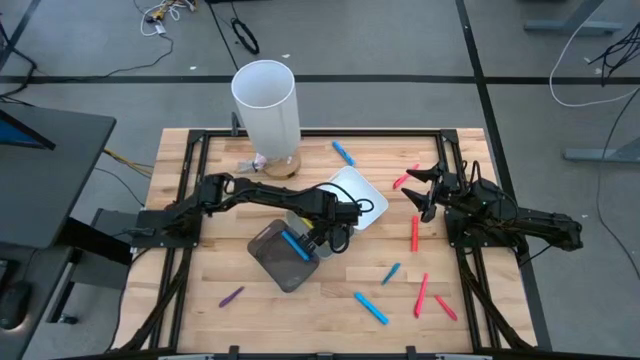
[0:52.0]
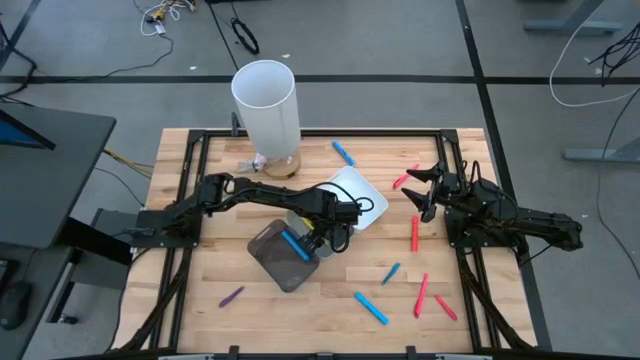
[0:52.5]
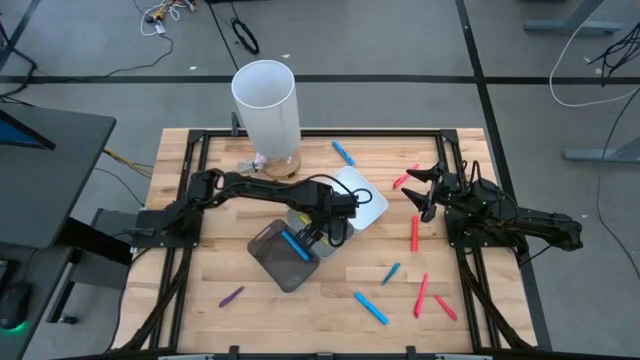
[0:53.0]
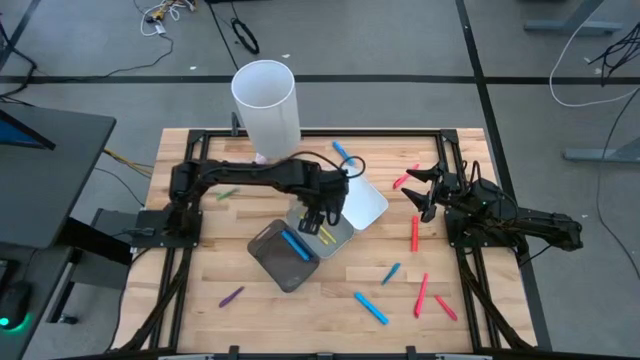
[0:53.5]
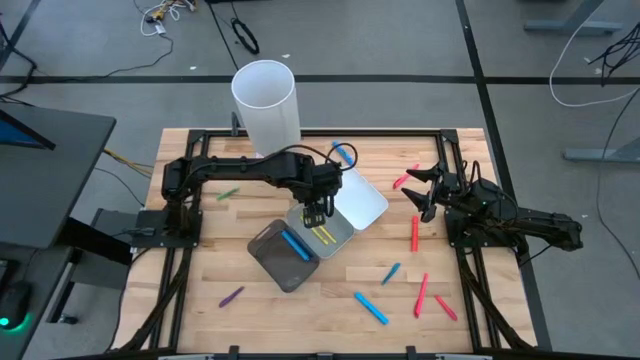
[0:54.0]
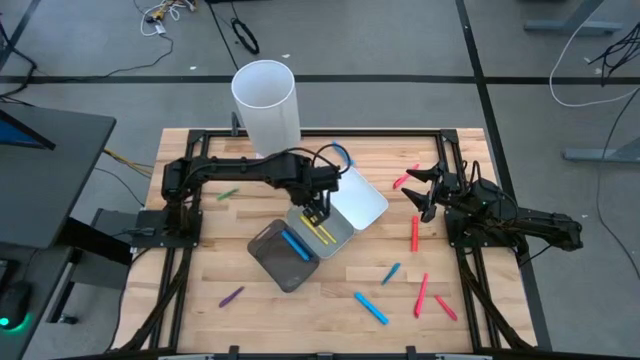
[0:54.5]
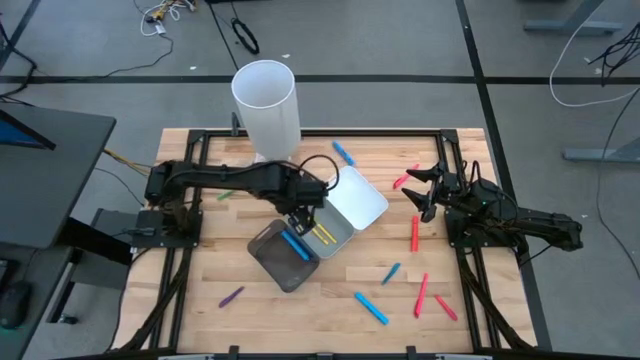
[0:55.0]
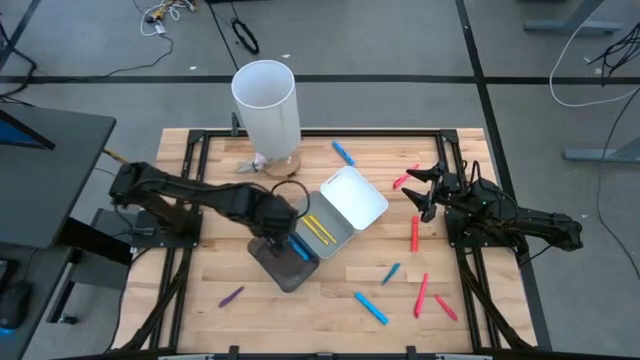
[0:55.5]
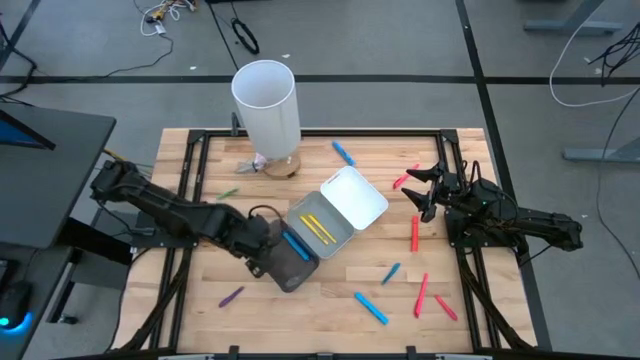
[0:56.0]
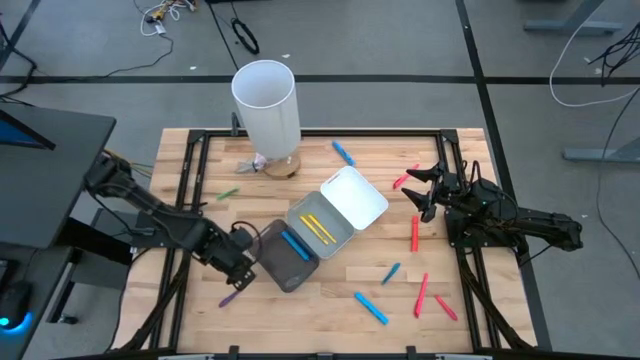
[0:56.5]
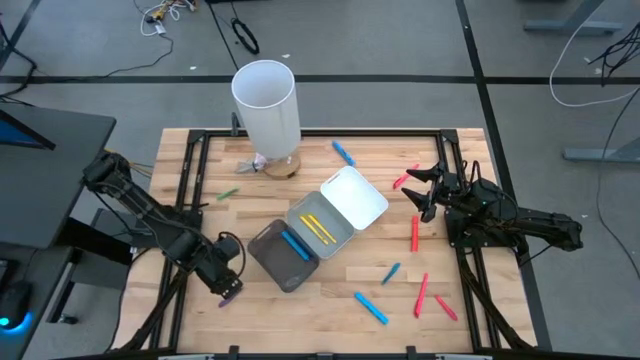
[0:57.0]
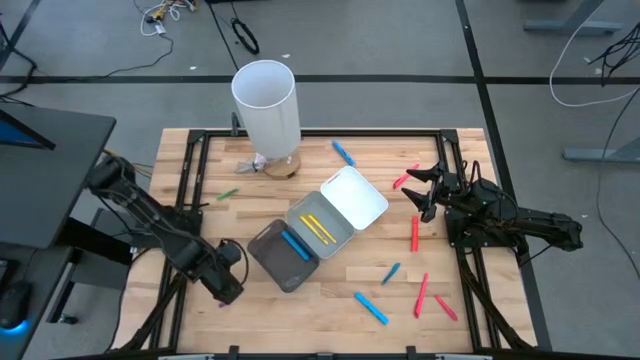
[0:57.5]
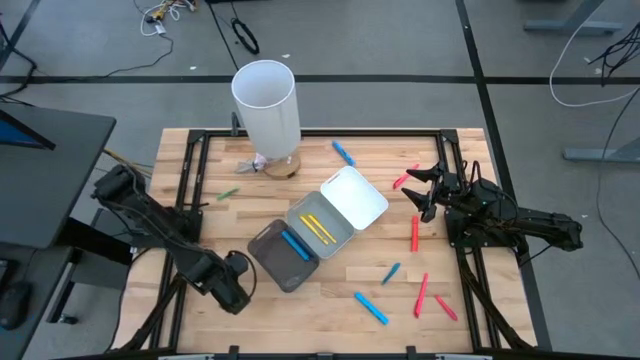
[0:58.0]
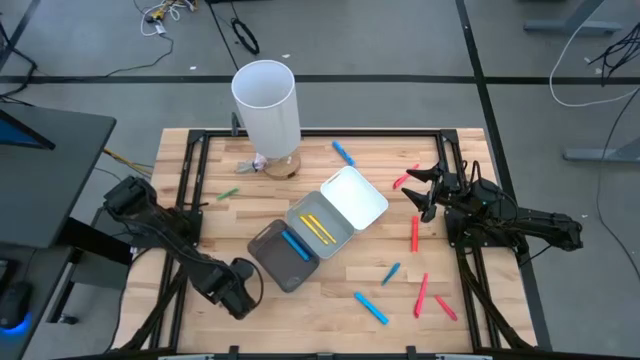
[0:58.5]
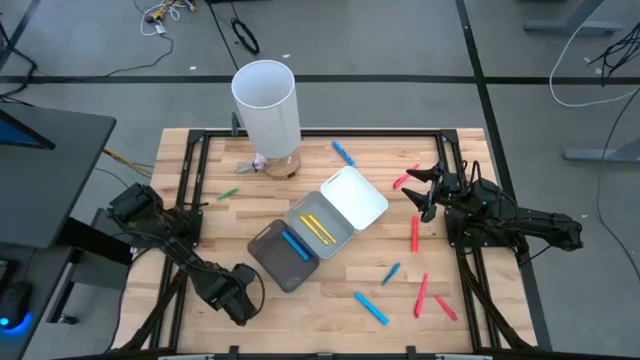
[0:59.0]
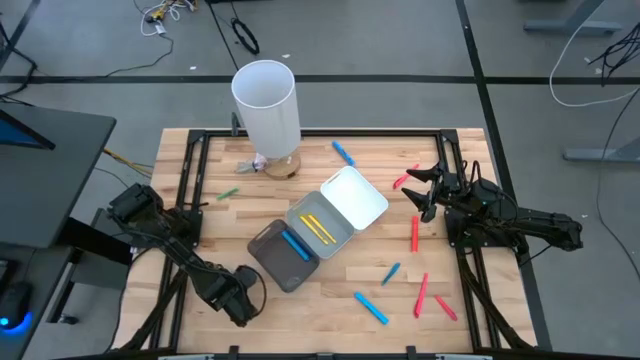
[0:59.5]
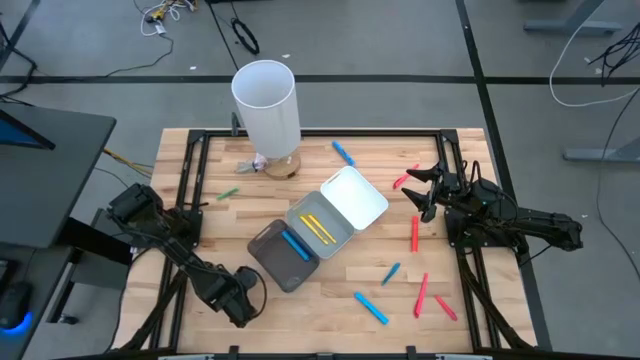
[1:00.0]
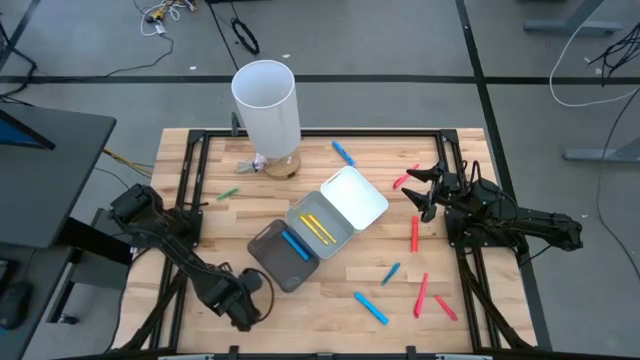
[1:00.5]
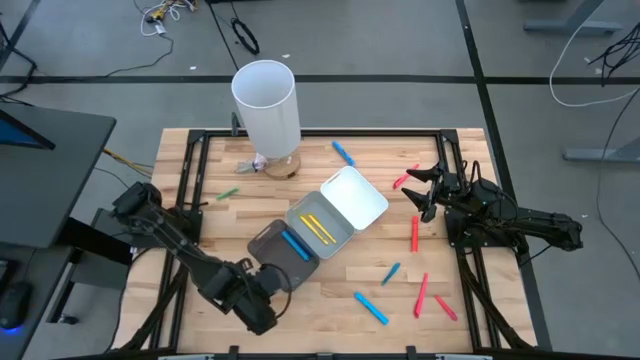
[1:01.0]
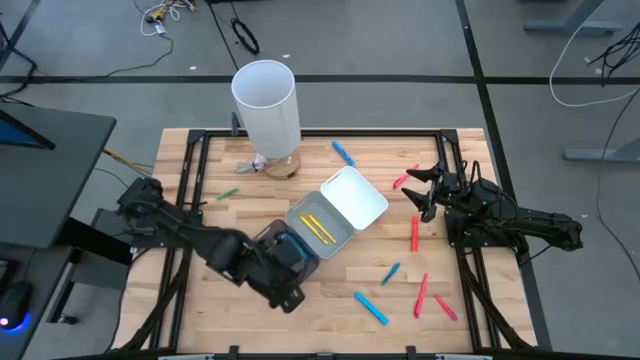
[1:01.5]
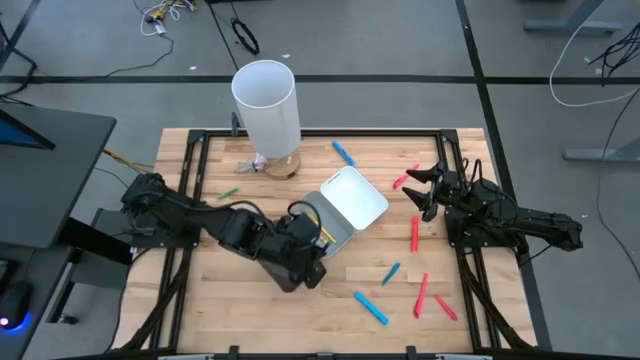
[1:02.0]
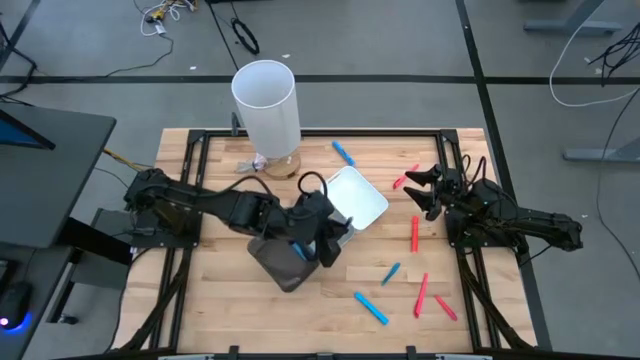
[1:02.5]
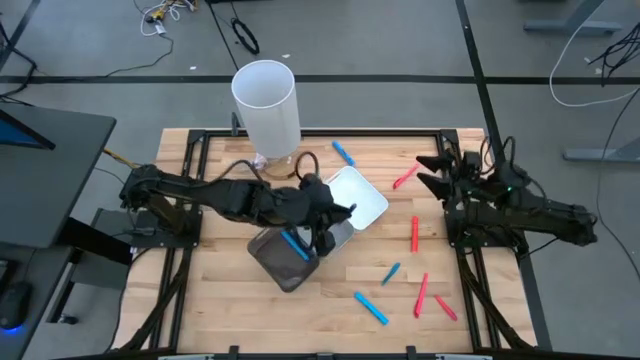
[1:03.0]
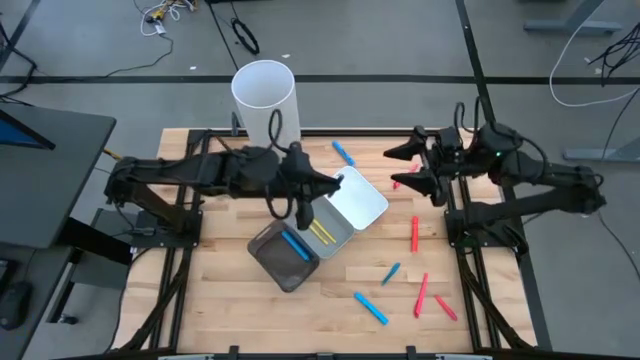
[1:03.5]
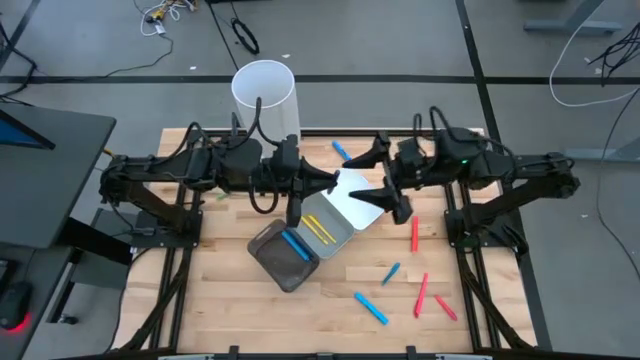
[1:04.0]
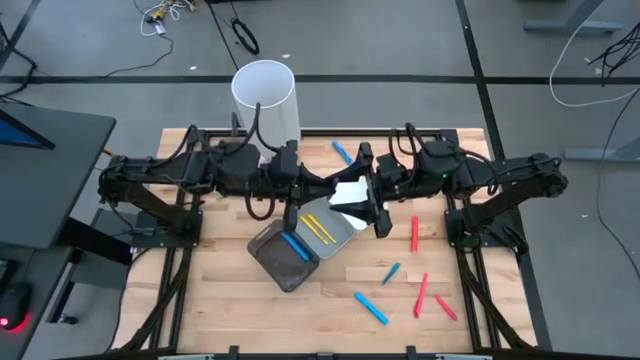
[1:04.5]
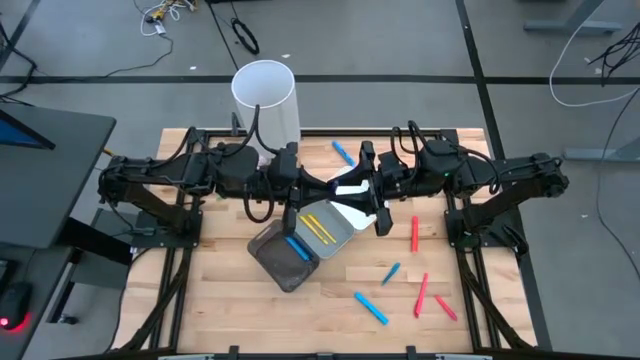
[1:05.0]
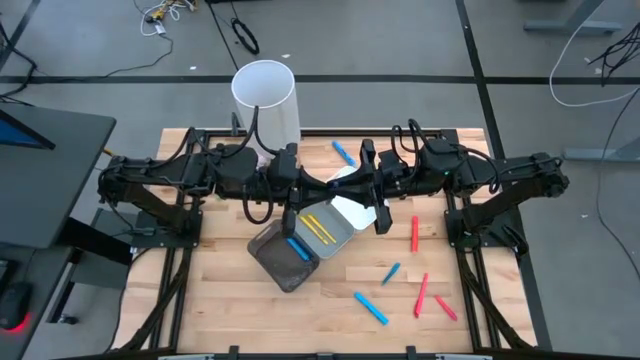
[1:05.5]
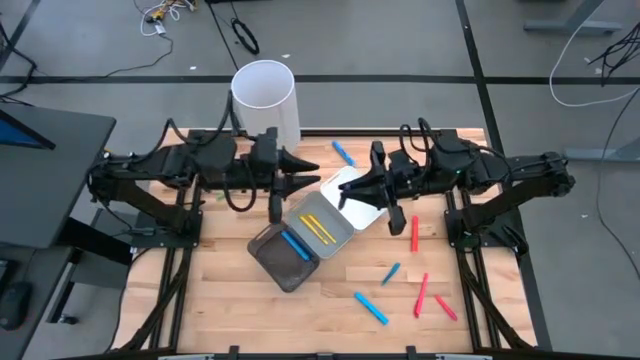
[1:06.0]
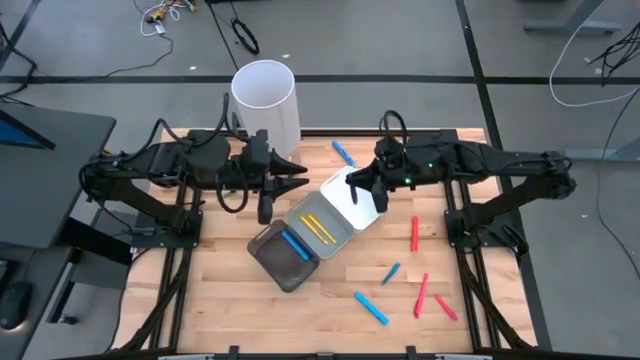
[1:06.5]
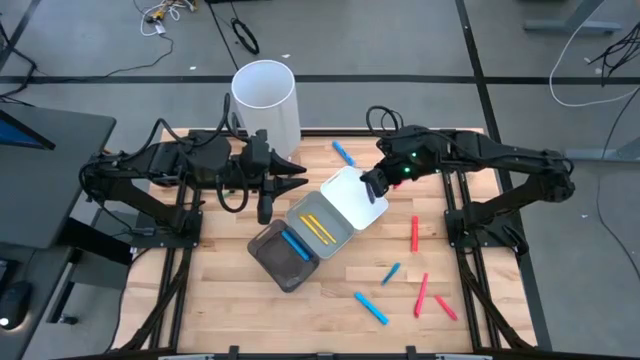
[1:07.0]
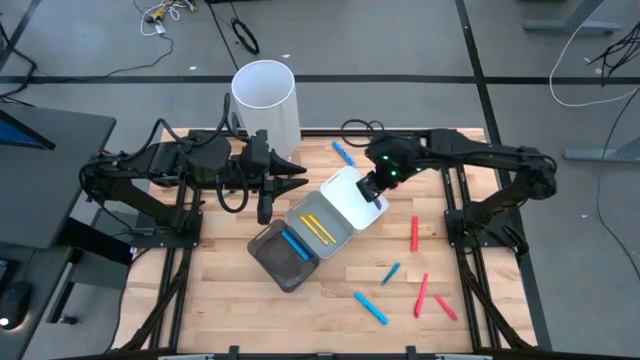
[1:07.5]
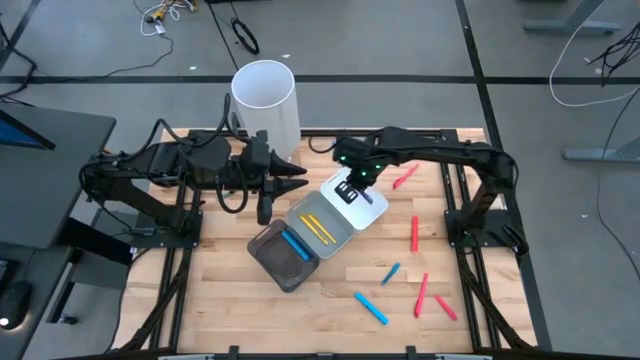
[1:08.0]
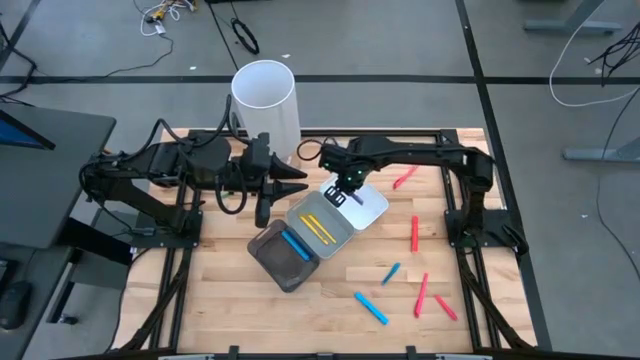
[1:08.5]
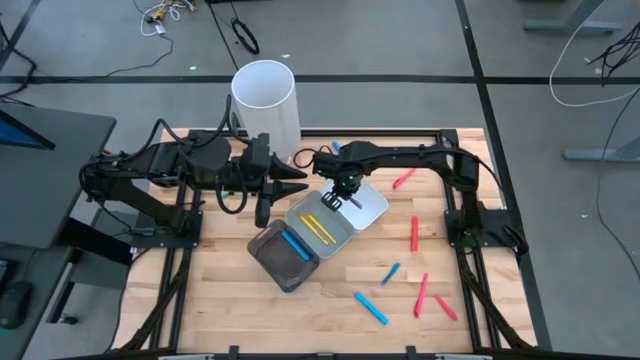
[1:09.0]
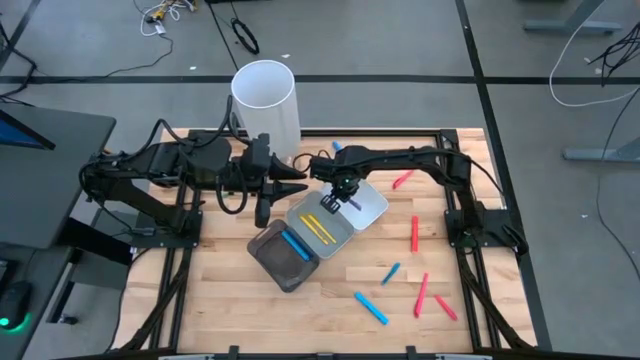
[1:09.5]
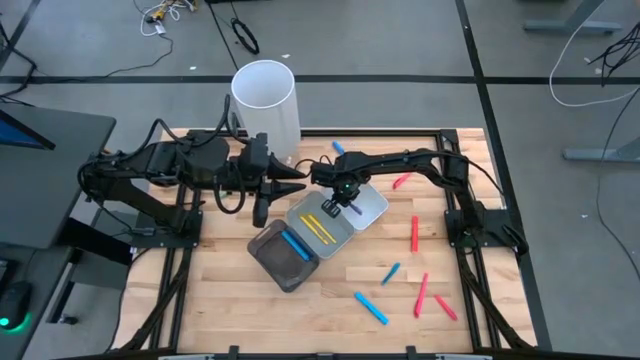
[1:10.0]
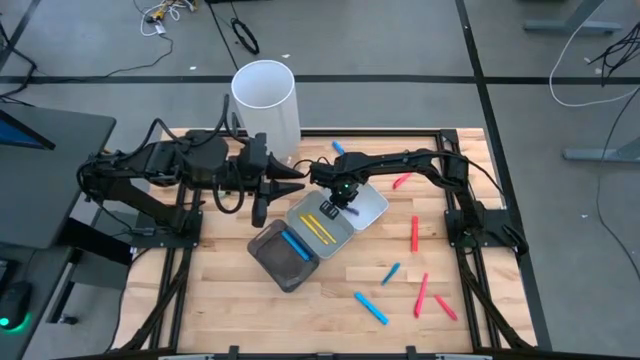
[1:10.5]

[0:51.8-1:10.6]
Task: Pick & Place Markers
Put the purple pen into the white bin

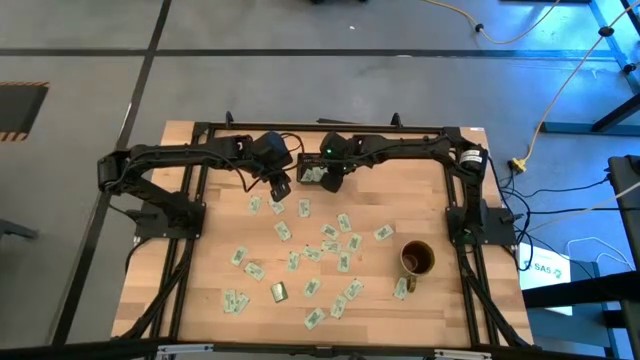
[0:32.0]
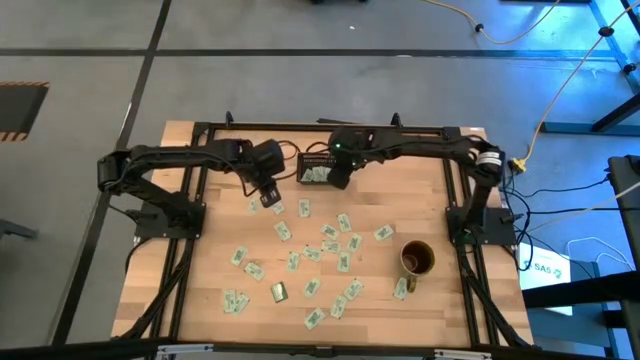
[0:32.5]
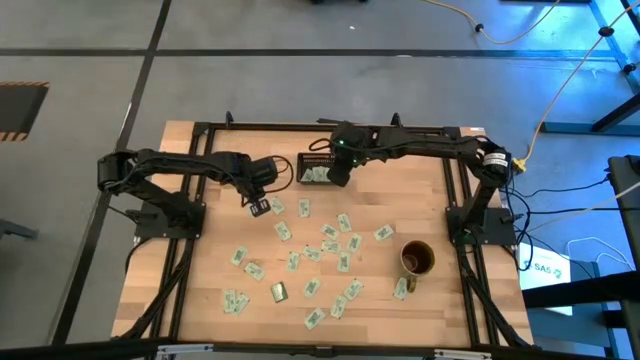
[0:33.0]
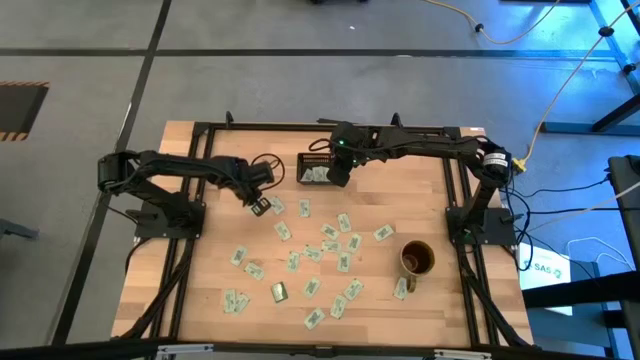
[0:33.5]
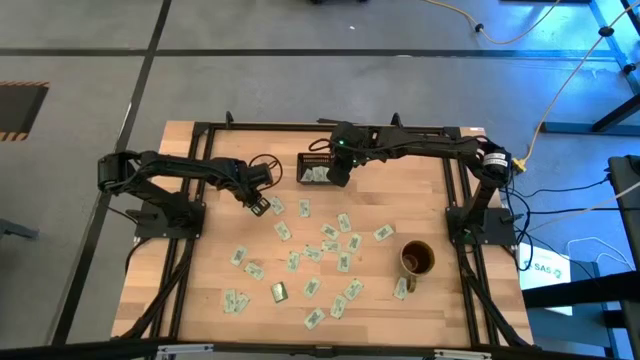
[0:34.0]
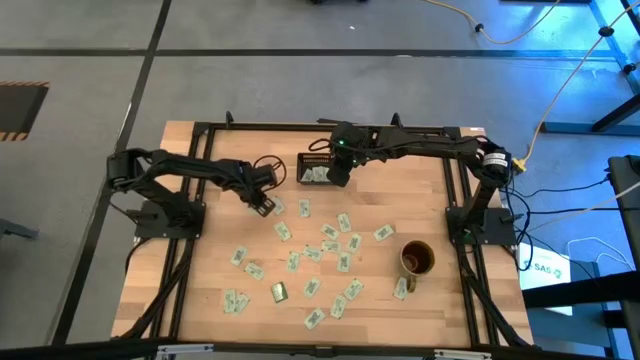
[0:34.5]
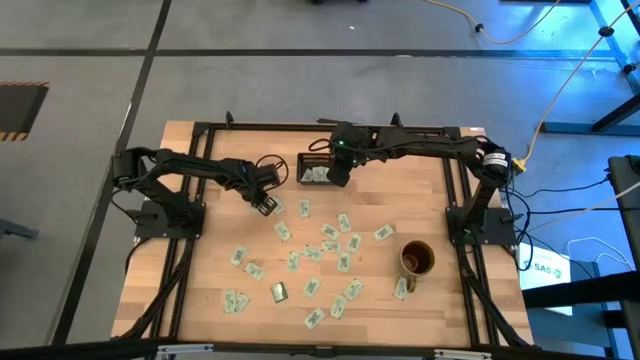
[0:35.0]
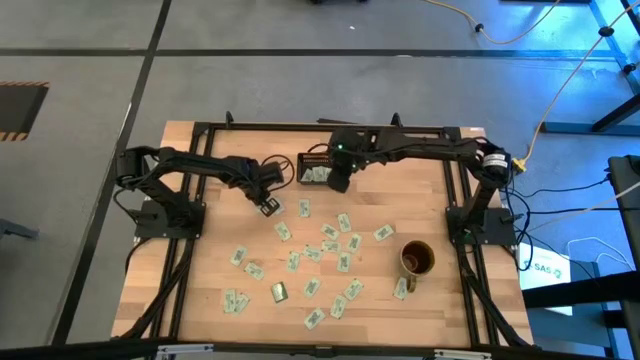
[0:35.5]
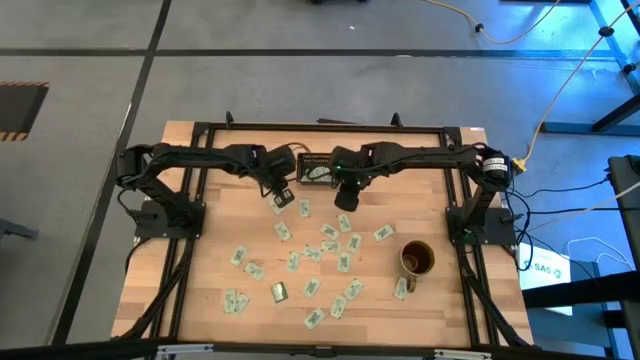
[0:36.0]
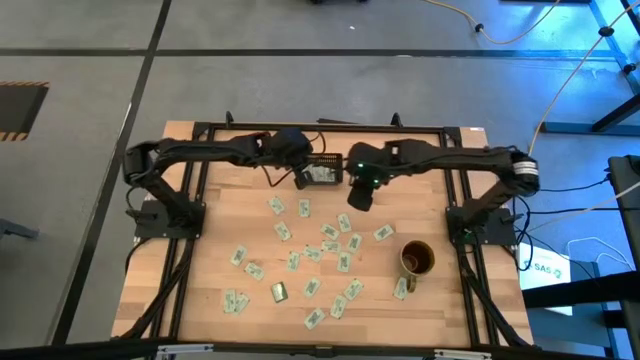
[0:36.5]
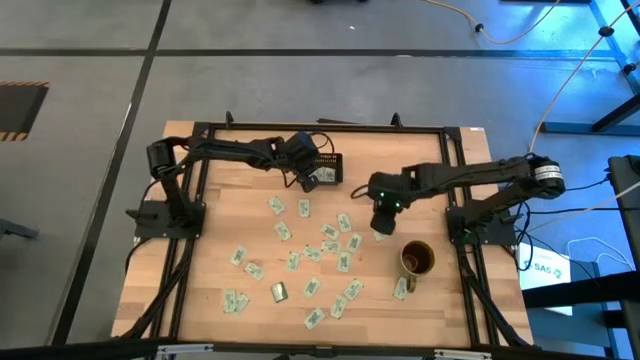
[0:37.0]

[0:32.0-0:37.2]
Task: Pick and place Stevia / Truvia into bins
Put the white stevia packet into the black bin
